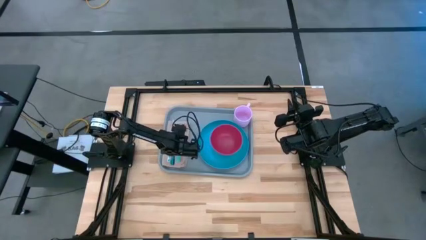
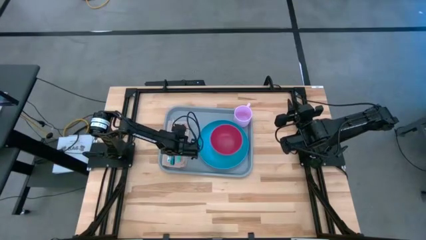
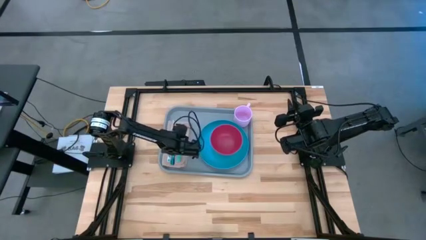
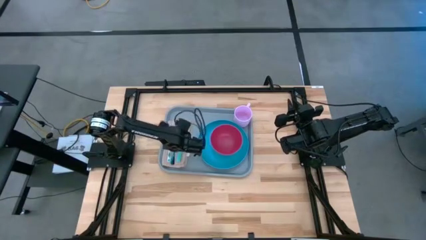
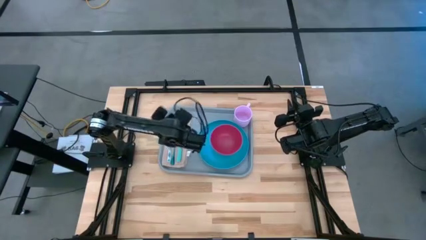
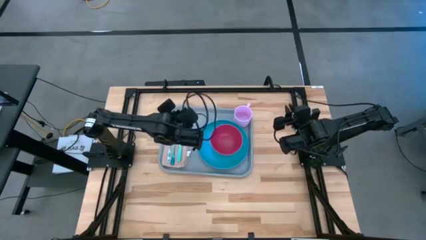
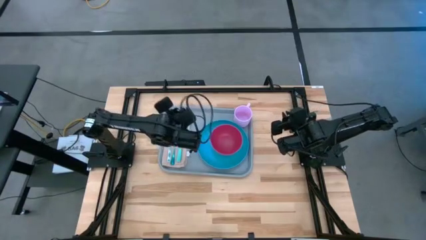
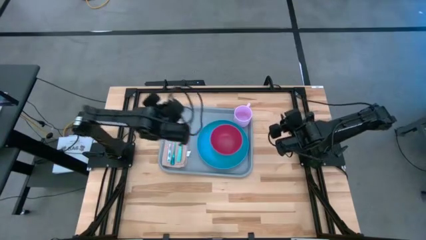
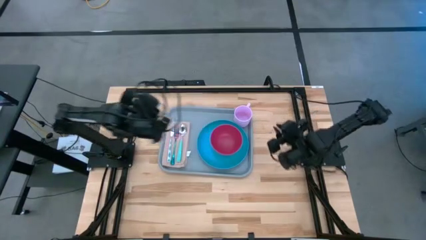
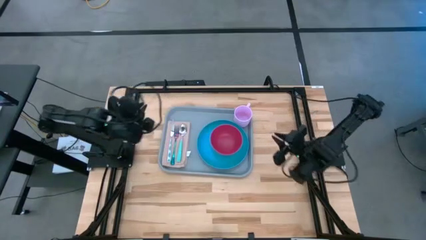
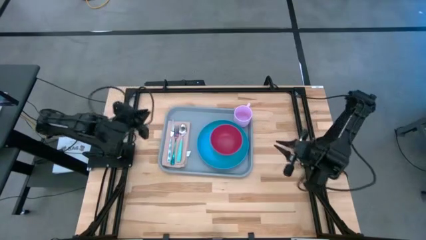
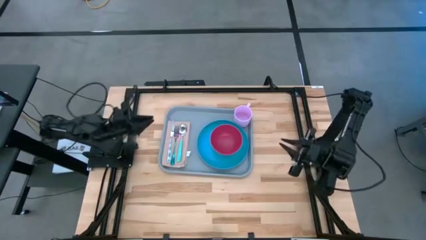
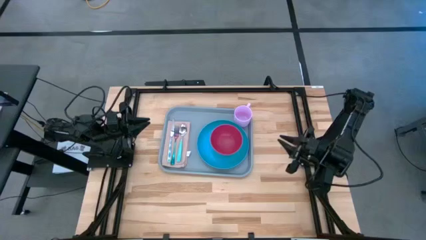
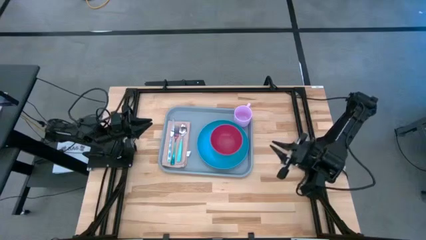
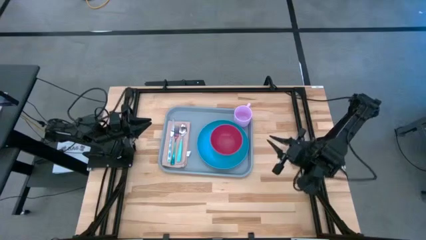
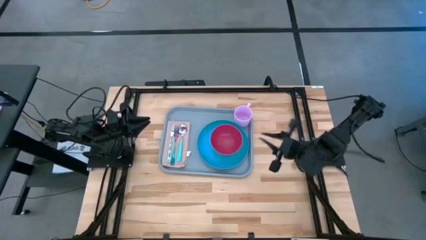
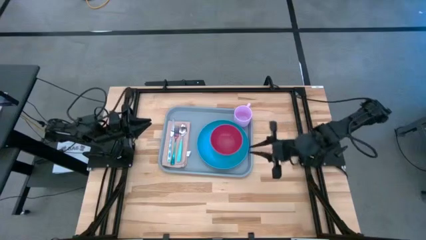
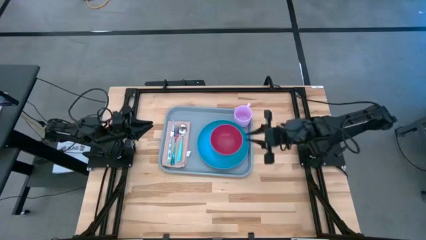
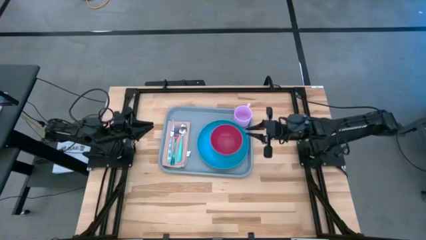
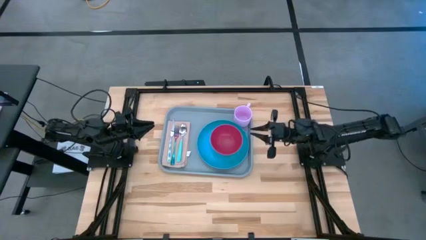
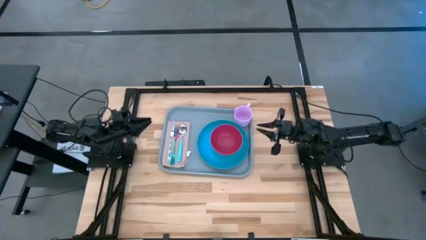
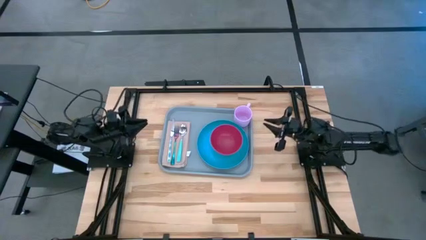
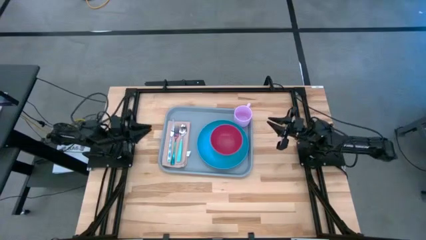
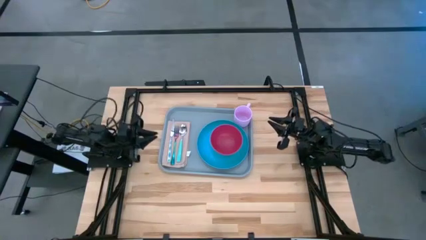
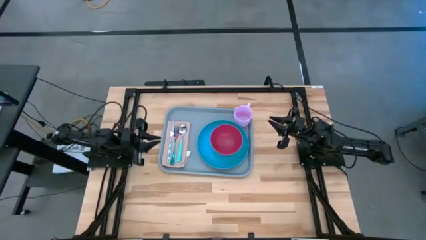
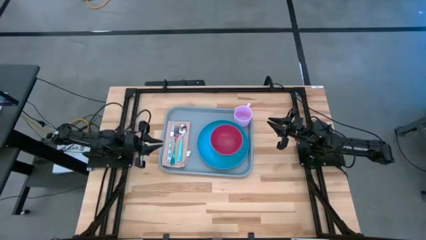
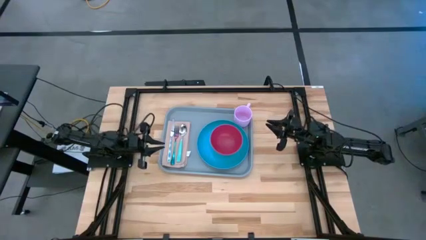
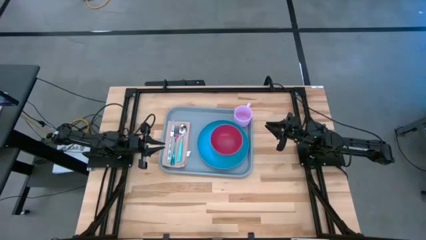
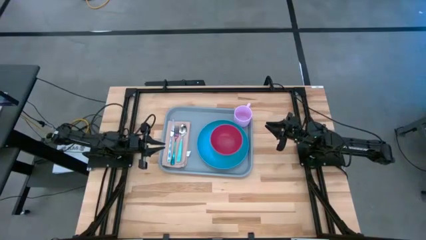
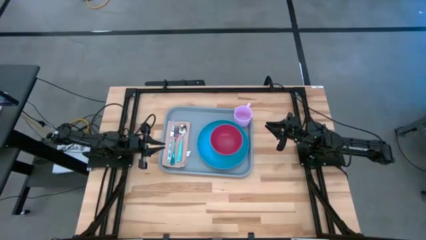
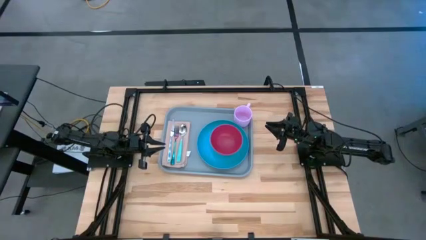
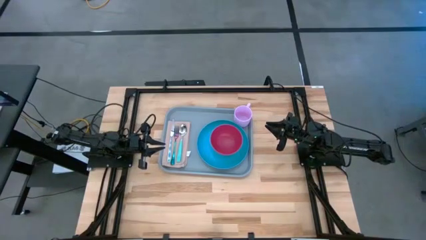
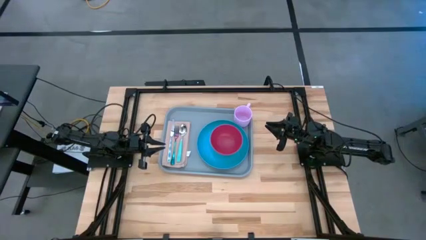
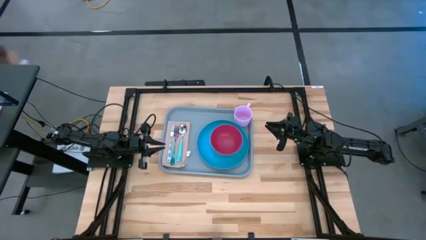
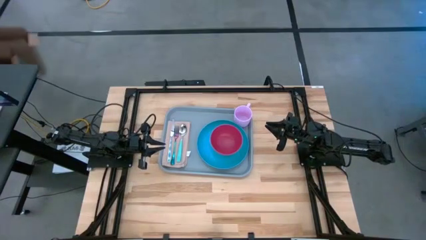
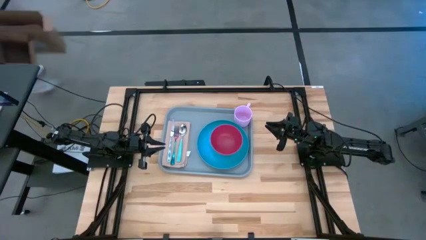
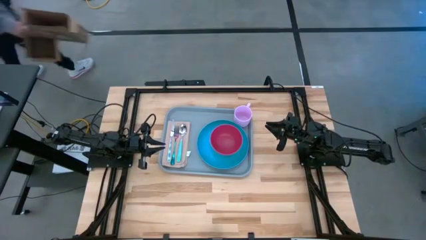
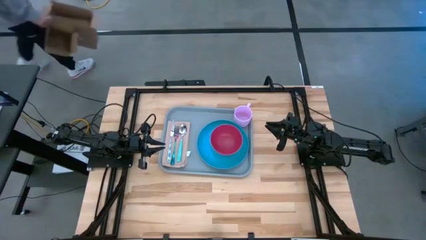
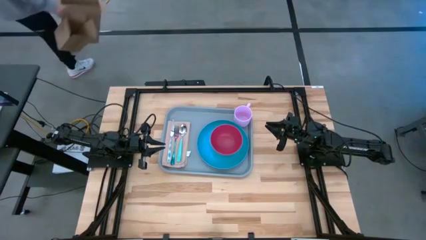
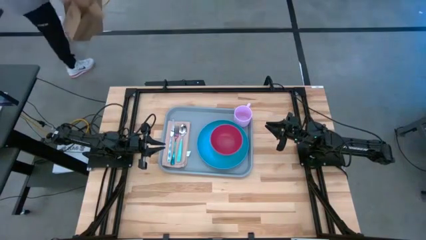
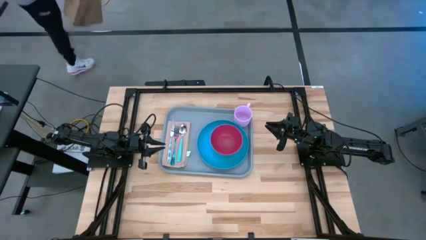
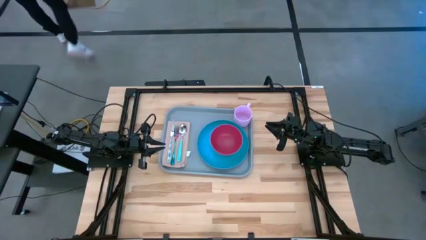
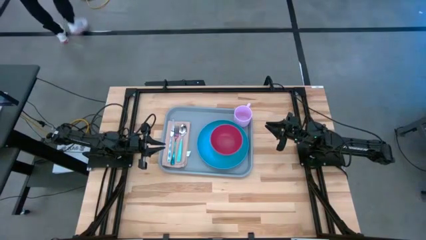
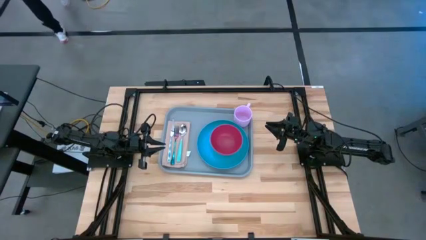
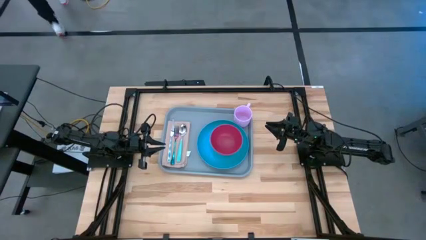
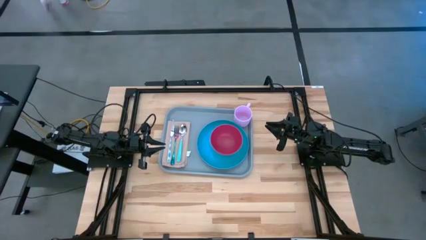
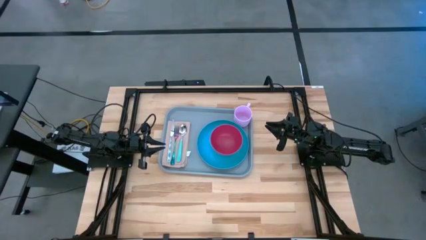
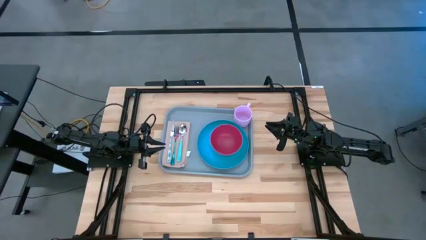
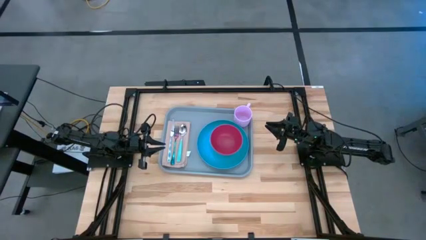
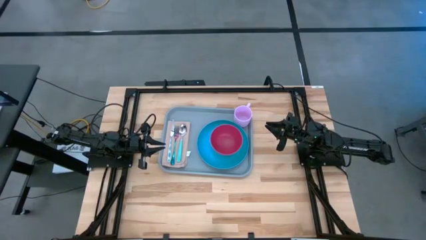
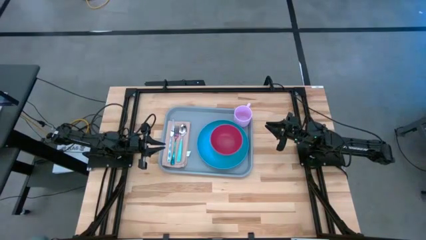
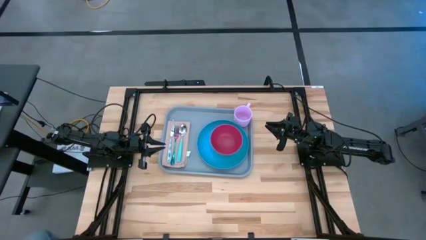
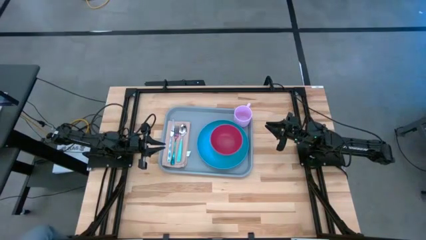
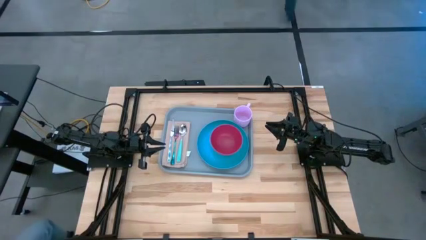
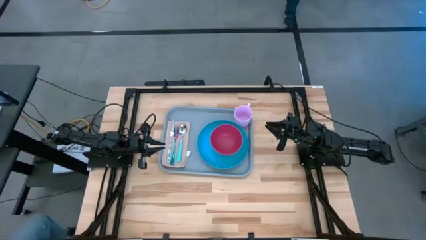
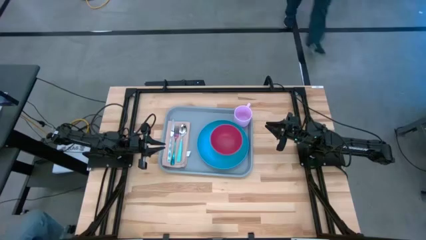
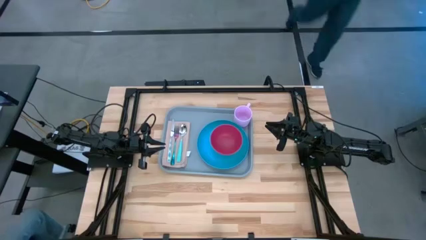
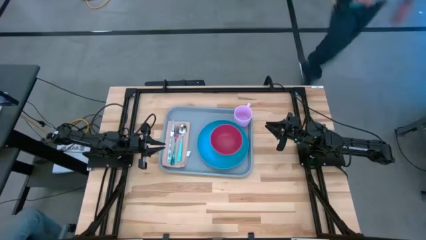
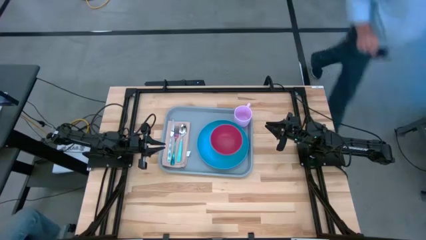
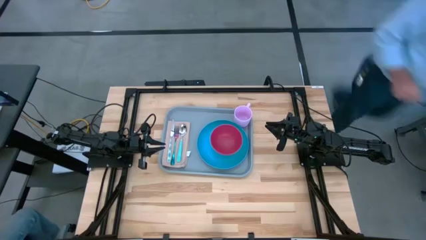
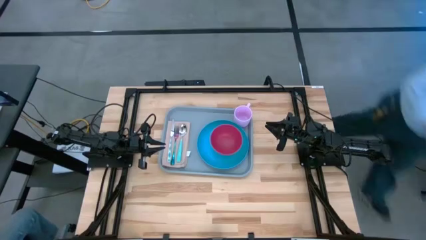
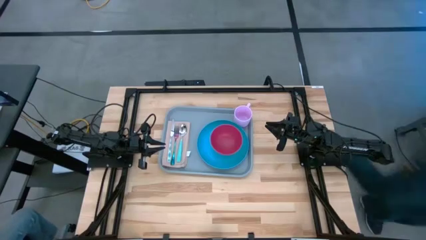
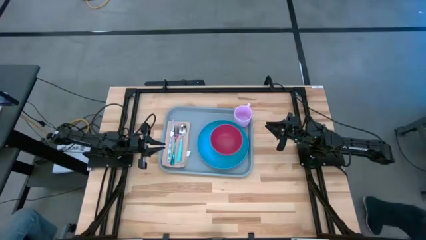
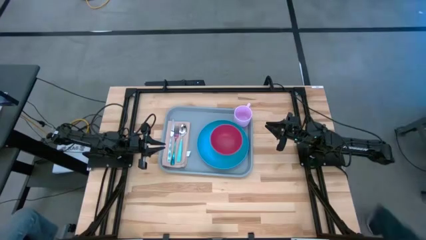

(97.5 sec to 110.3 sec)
Task: Set up tray
Return to Home Position

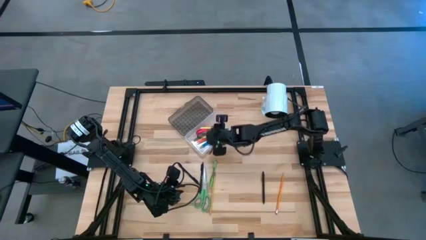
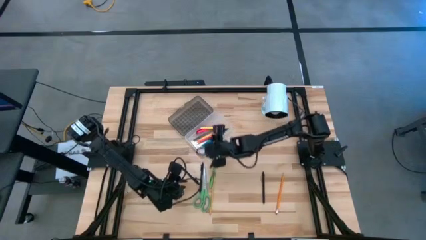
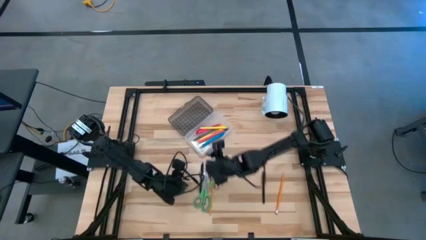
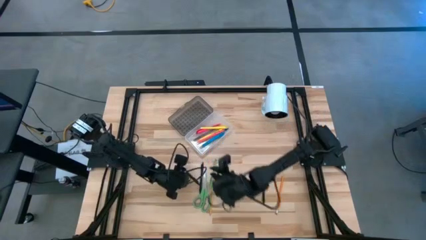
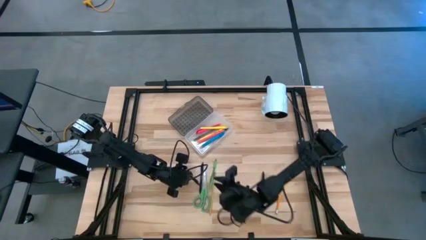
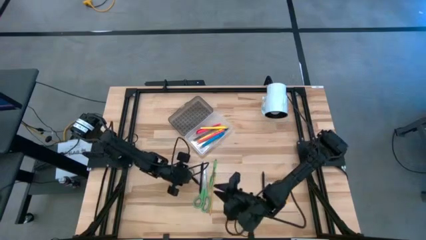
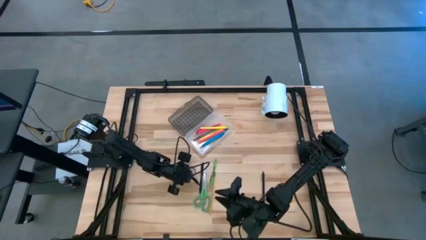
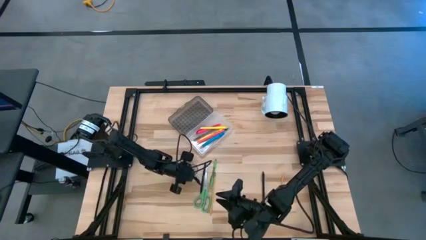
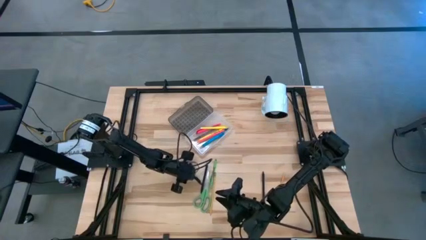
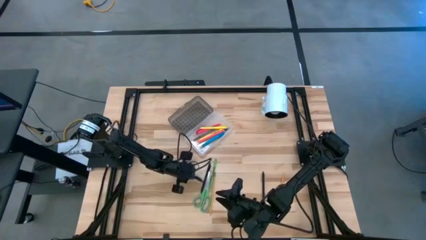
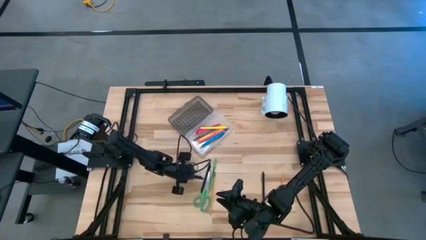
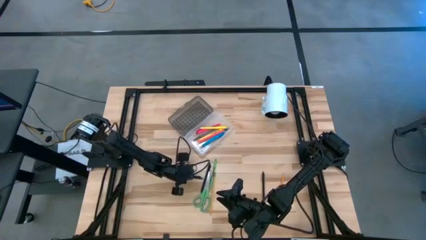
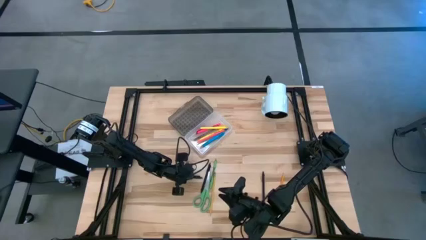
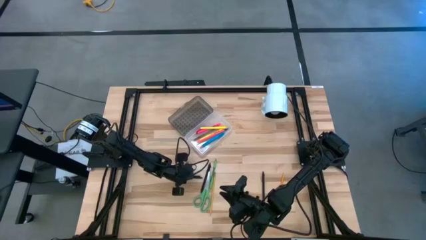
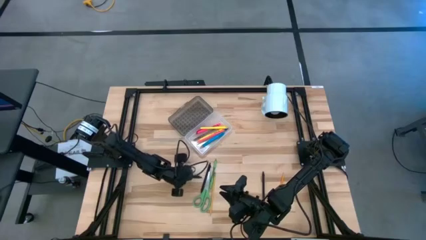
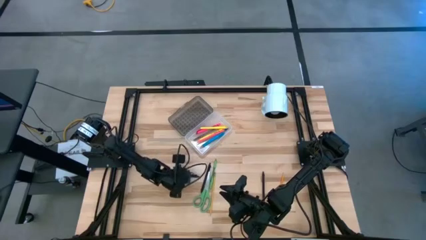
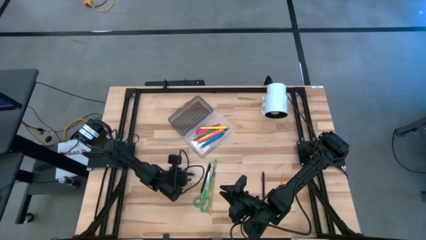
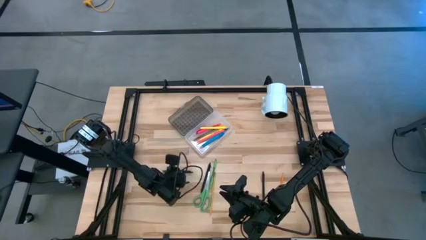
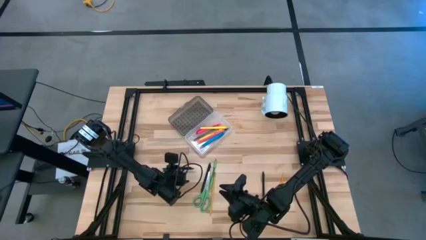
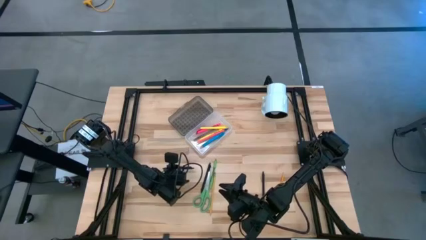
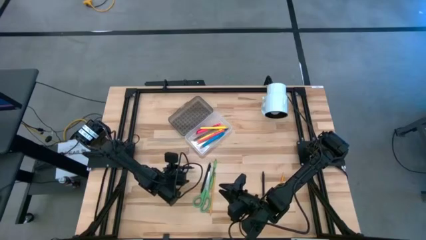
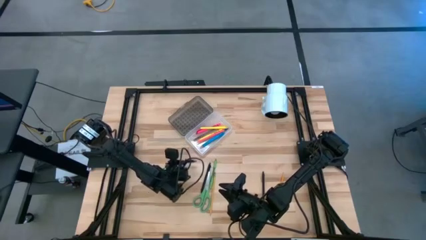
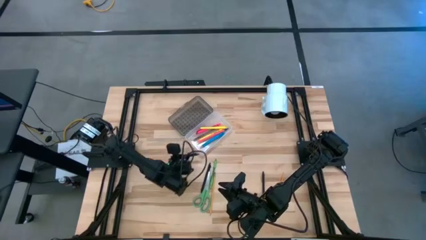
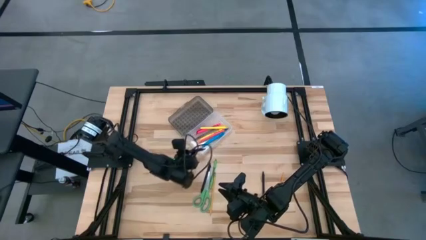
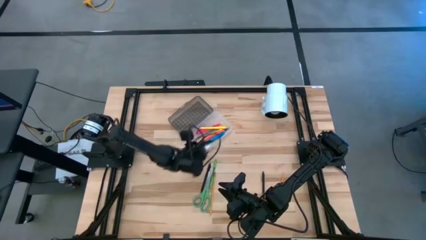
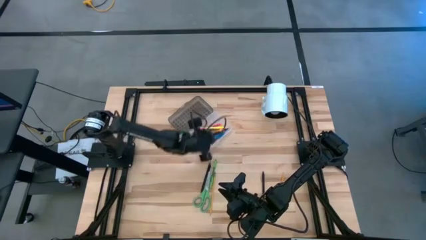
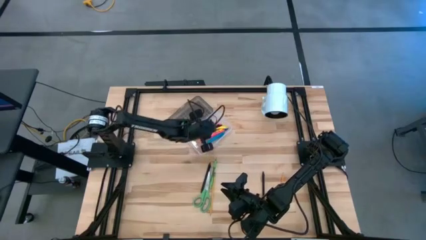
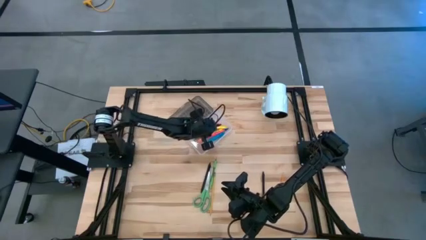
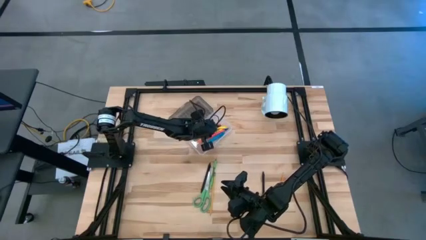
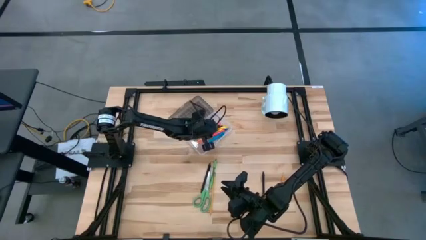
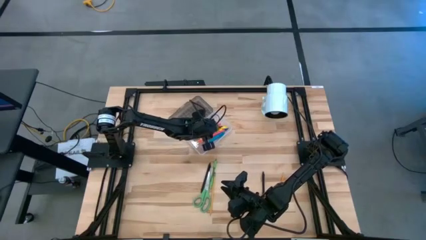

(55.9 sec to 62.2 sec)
Task: Pick & place school supplies into a supply box
Put the left black pen into the transparent supply box
